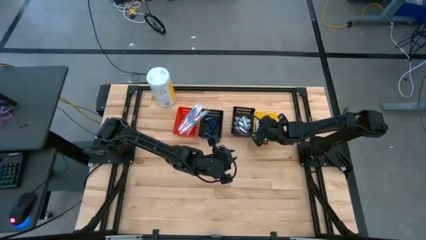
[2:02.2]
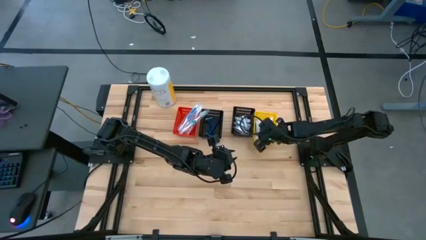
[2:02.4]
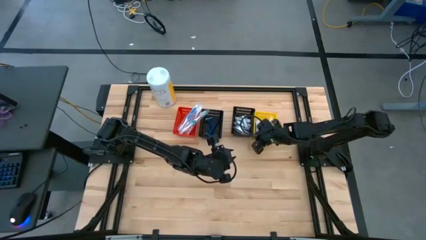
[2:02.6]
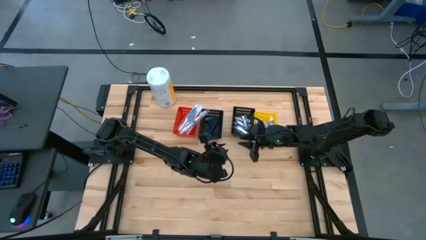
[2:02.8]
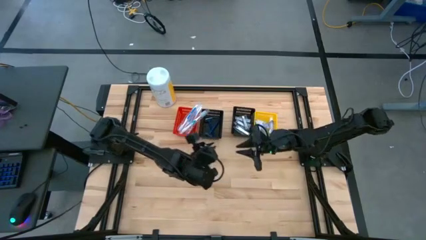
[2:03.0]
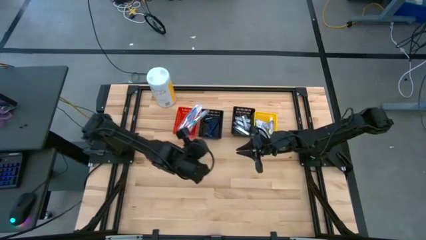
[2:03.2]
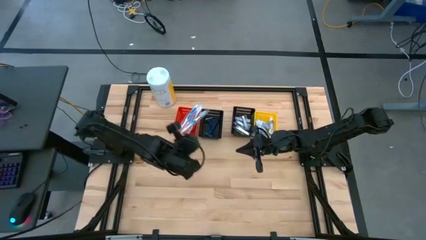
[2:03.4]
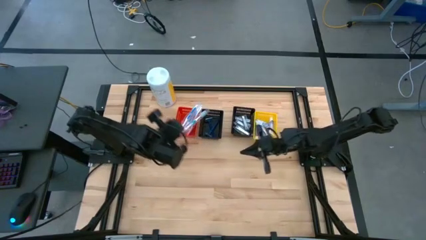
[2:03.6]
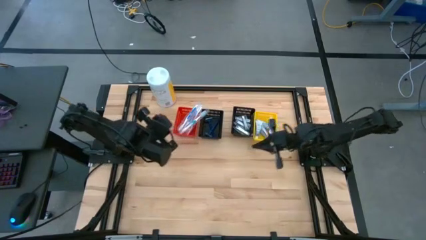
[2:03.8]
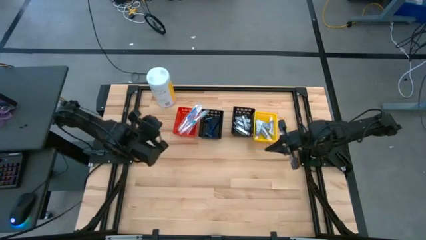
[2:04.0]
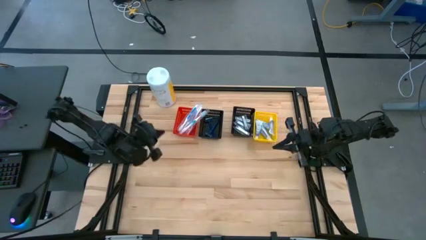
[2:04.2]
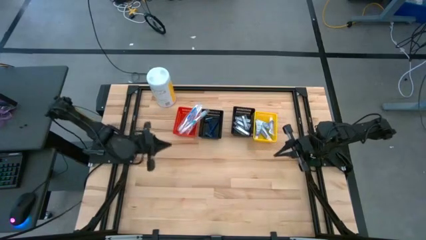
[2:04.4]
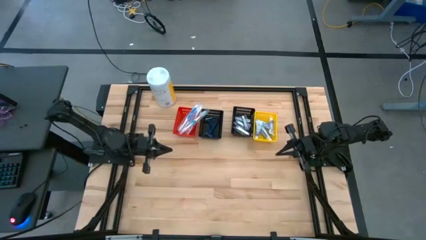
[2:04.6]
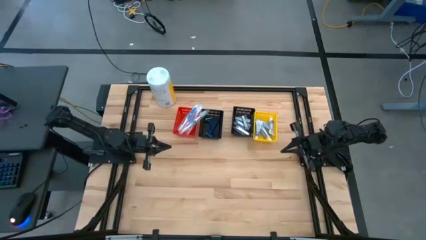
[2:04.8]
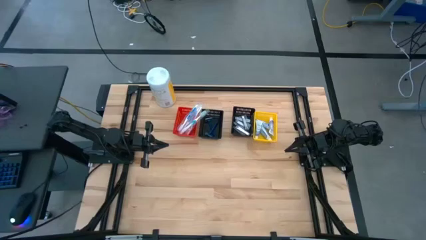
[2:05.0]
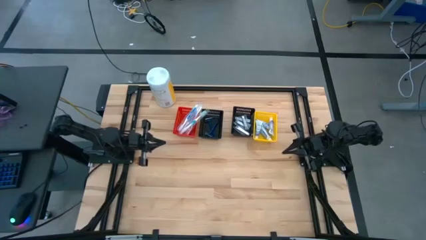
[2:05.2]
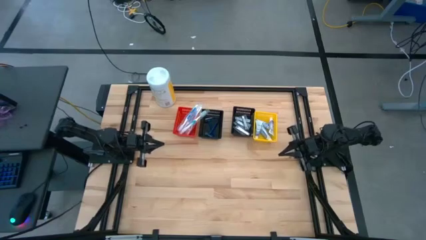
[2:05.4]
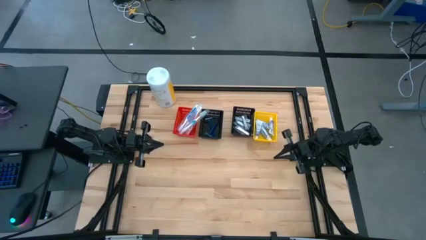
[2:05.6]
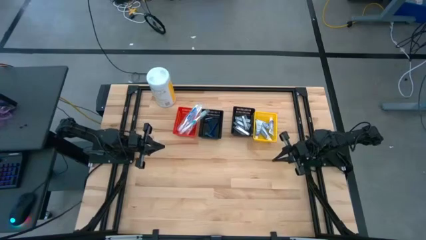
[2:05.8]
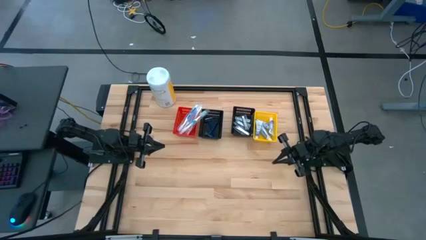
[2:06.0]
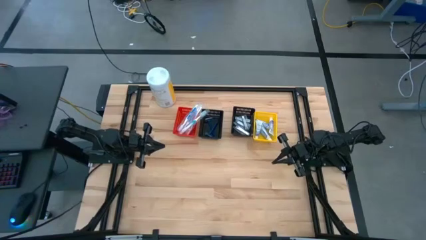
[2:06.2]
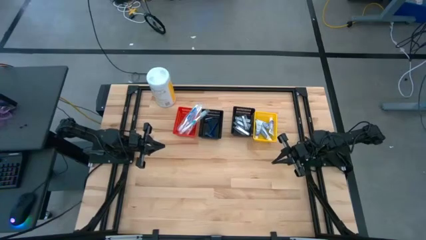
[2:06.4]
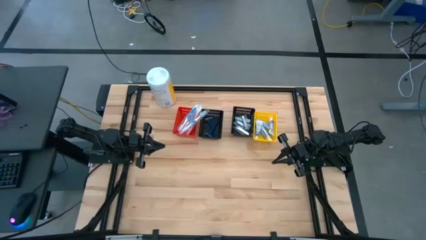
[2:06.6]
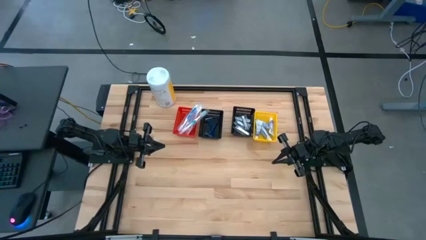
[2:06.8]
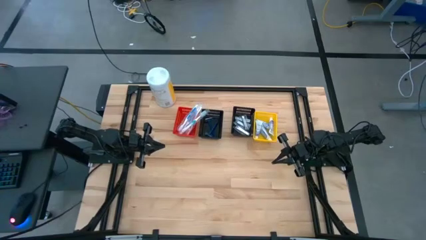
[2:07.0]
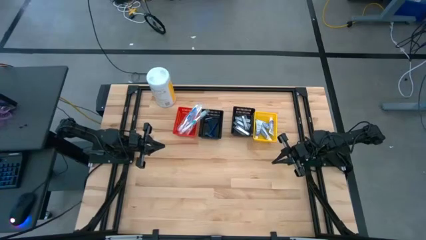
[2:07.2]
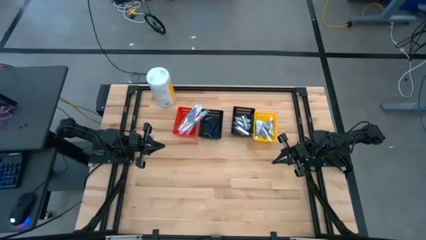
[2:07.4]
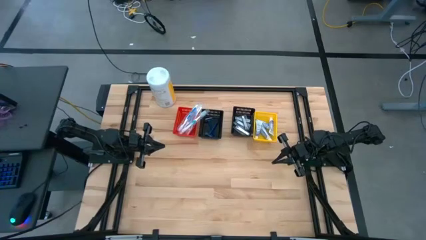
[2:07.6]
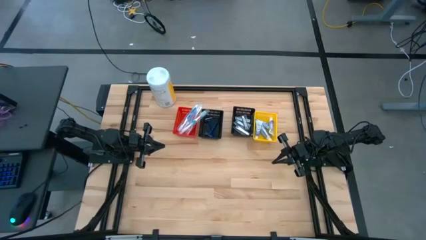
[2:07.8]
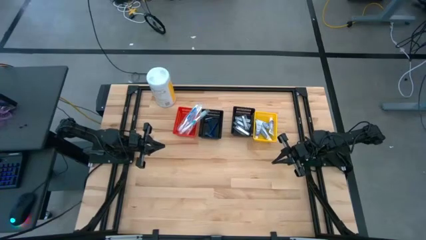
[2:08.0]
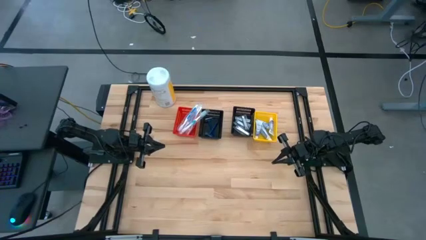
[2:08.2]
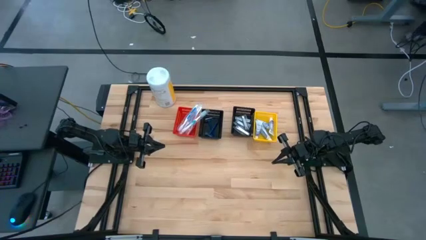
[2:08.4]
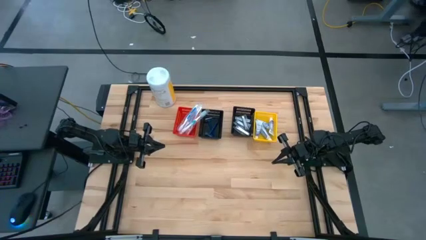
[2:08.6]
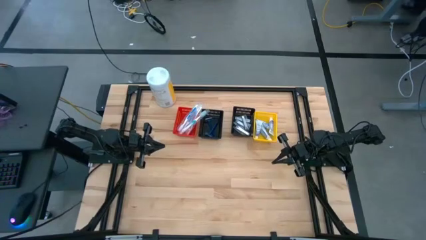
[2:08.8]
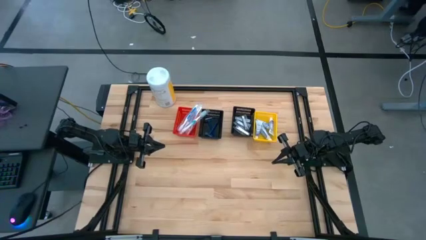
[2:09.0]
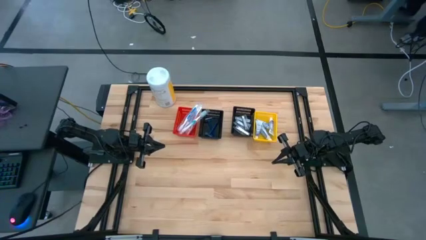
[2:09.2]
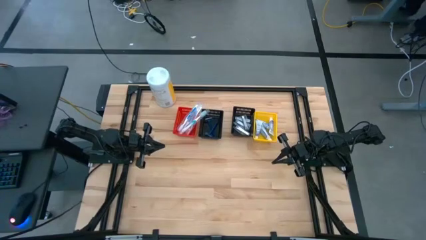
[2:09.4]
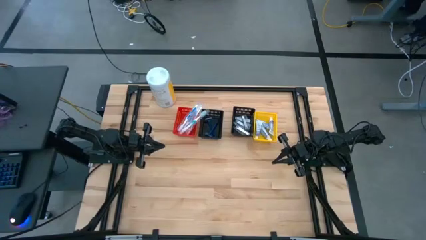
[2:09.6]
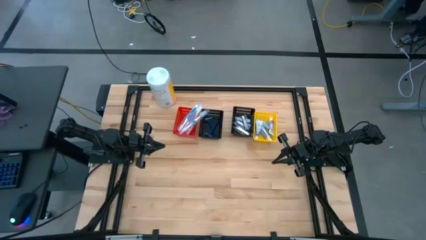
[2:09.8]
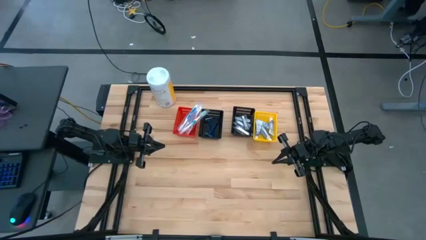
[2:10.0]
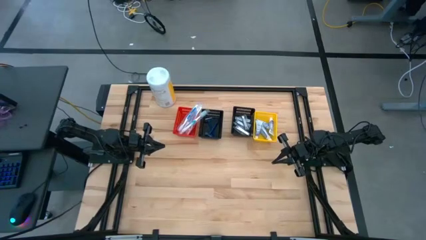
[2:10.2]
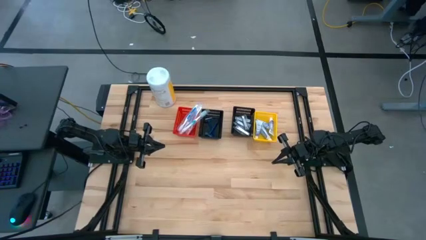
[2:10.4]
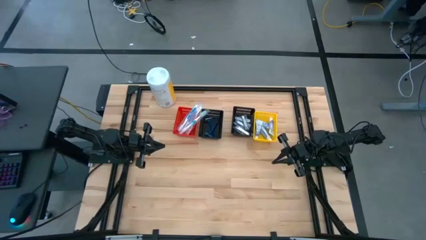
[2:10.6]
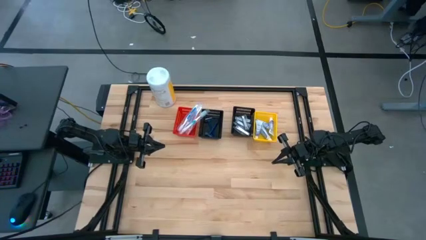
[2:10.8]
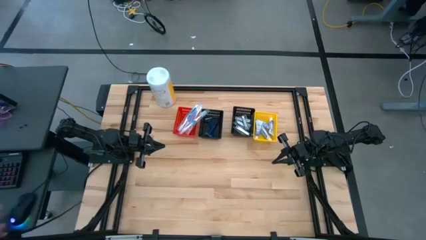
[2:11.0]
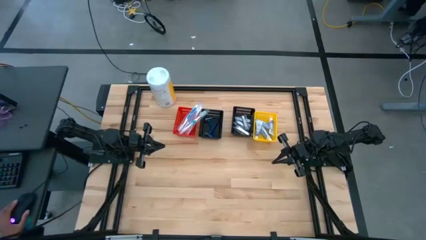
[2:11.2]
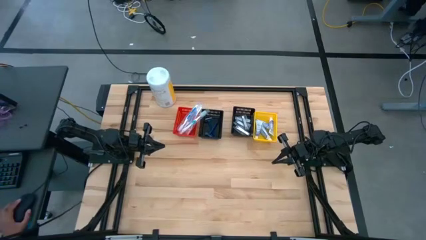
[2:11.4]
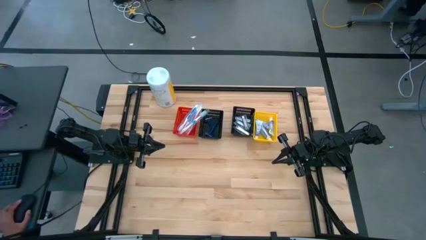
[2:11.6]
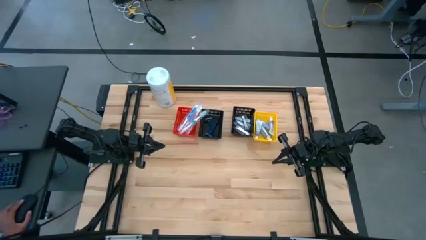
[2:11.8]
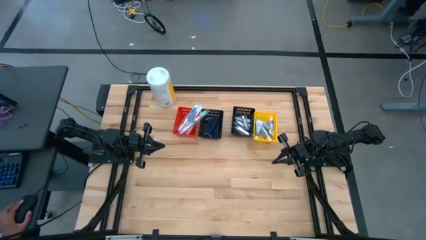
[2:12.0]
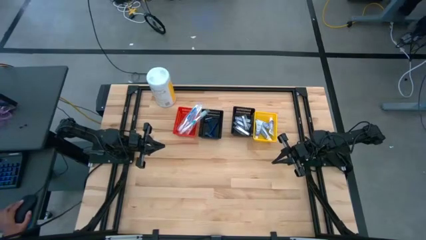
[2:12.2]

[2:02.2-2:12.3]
Task: Pick & Place Travel size toiletries
Return to Home Position

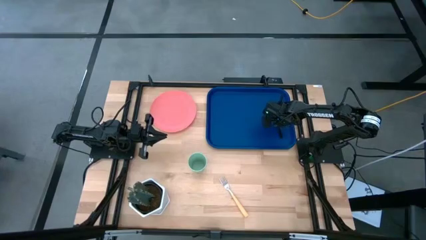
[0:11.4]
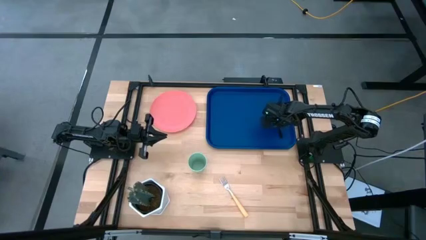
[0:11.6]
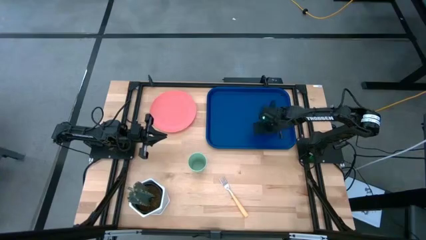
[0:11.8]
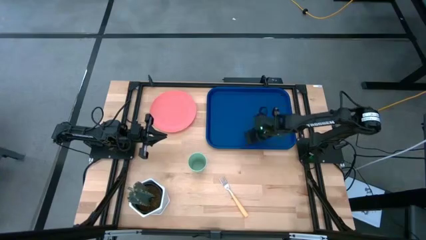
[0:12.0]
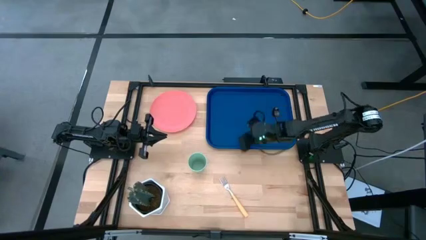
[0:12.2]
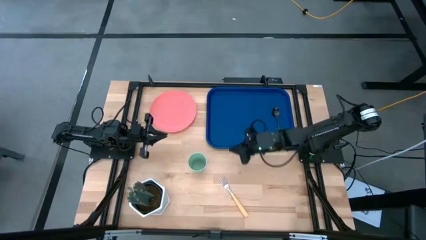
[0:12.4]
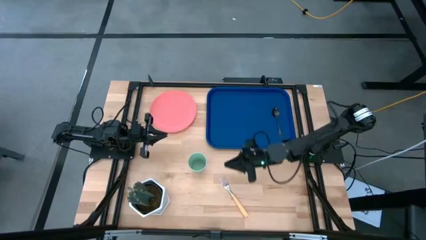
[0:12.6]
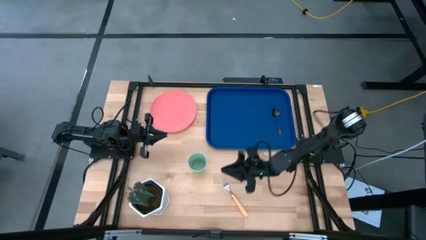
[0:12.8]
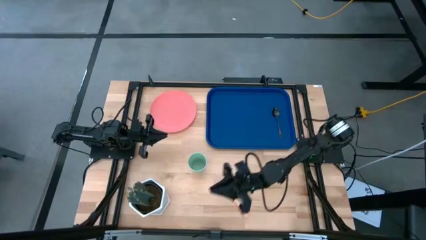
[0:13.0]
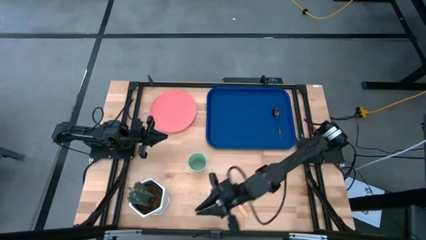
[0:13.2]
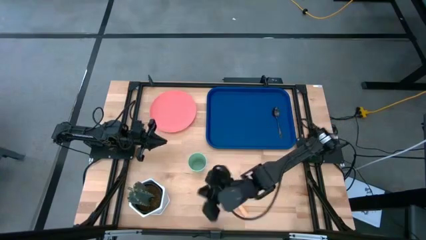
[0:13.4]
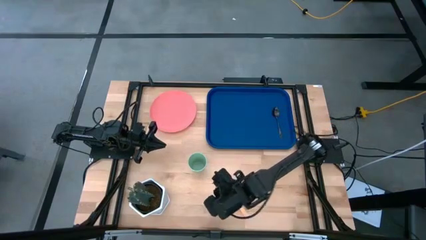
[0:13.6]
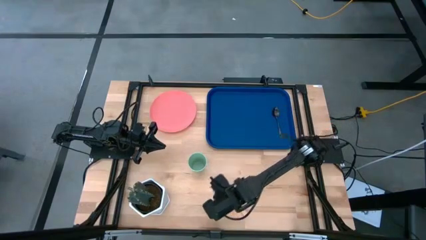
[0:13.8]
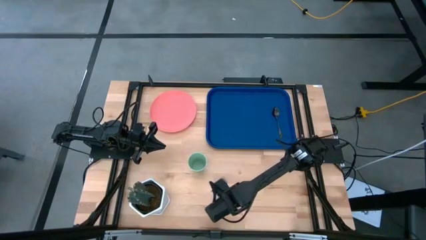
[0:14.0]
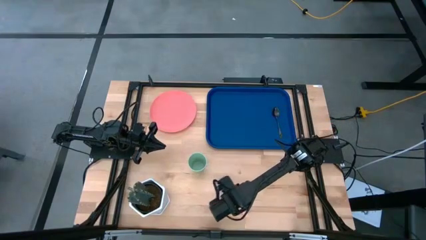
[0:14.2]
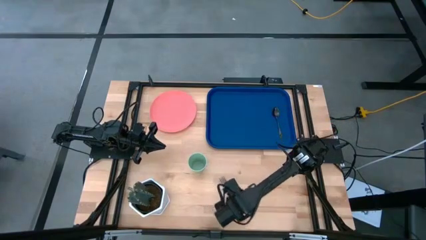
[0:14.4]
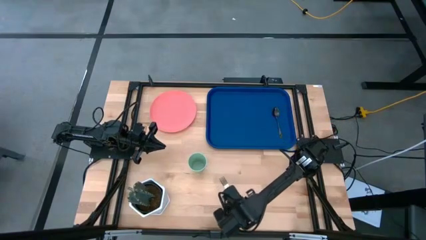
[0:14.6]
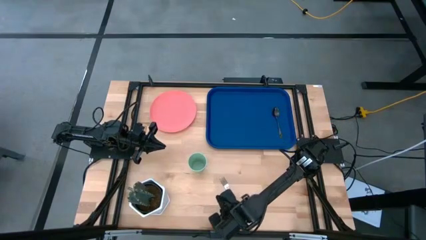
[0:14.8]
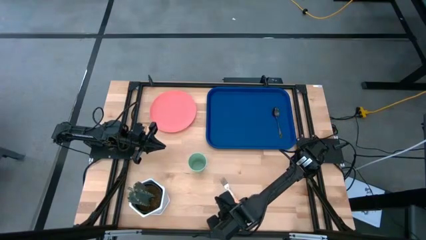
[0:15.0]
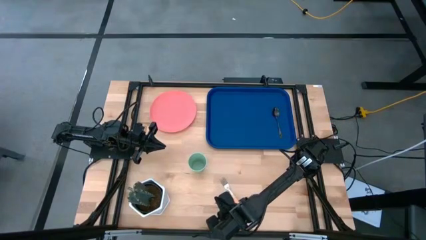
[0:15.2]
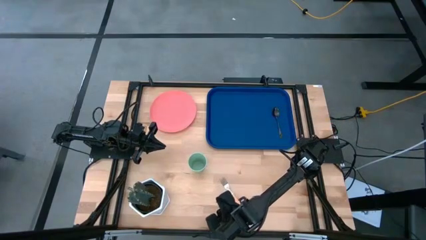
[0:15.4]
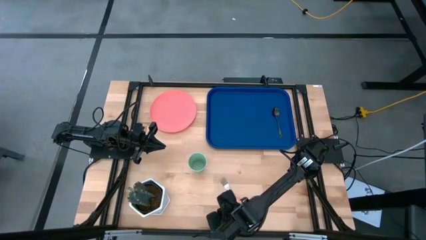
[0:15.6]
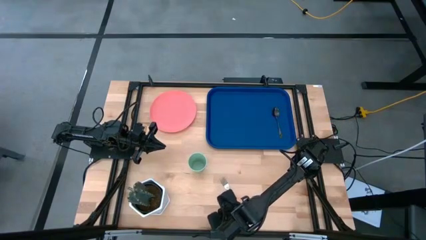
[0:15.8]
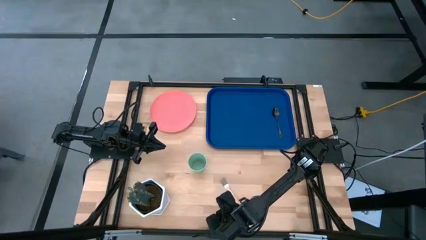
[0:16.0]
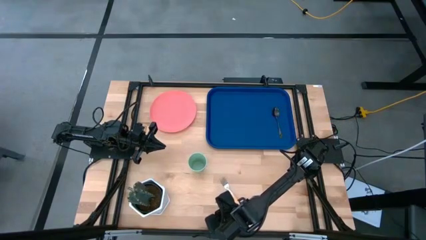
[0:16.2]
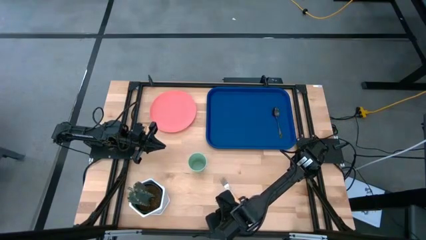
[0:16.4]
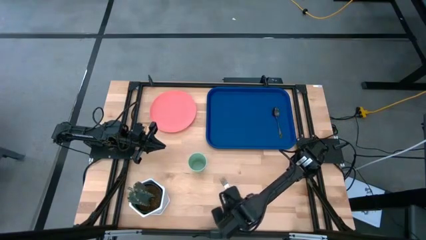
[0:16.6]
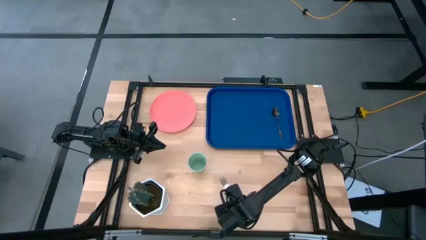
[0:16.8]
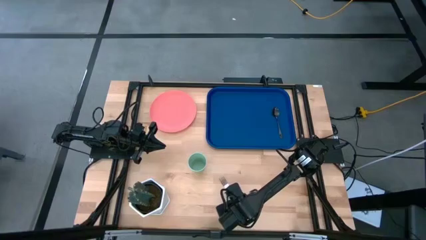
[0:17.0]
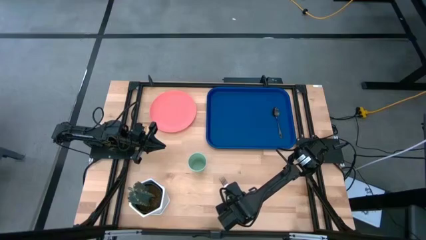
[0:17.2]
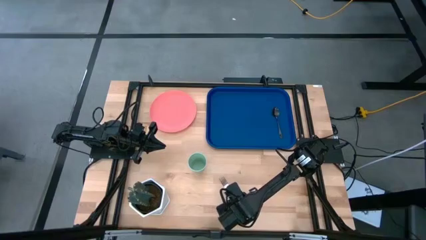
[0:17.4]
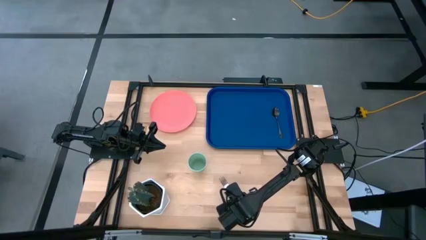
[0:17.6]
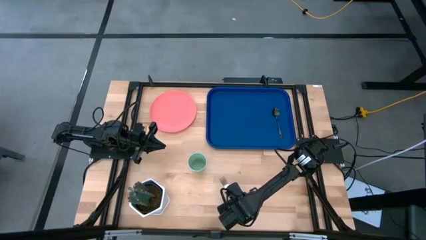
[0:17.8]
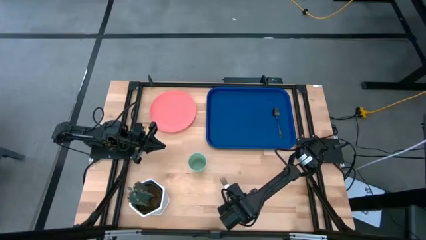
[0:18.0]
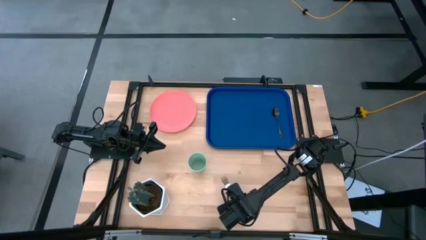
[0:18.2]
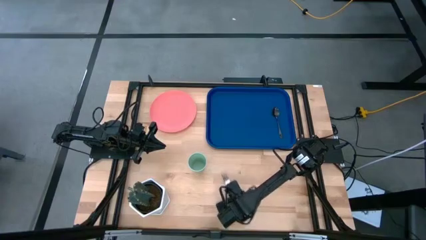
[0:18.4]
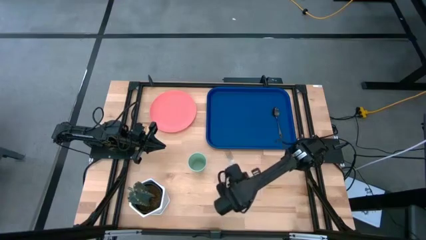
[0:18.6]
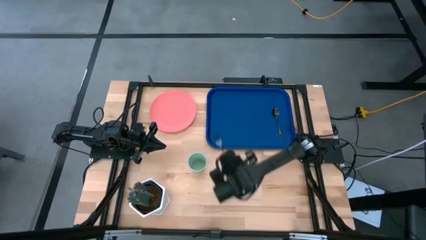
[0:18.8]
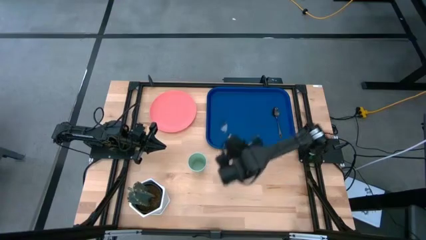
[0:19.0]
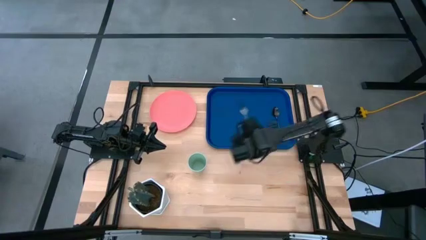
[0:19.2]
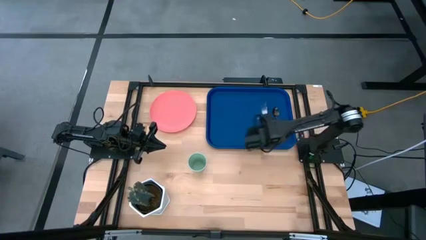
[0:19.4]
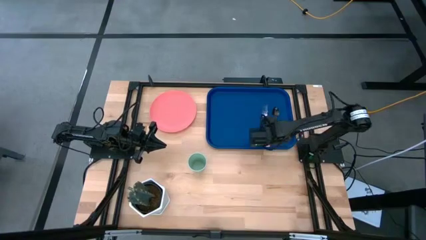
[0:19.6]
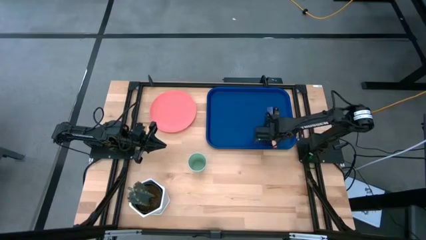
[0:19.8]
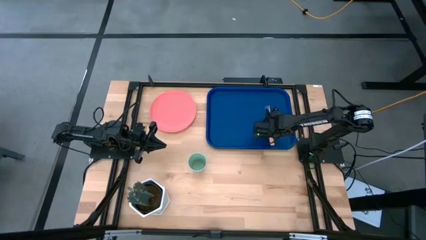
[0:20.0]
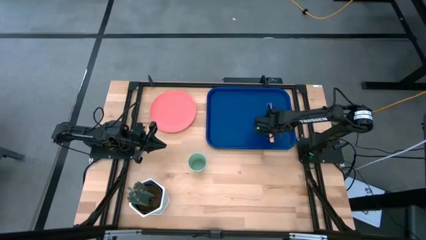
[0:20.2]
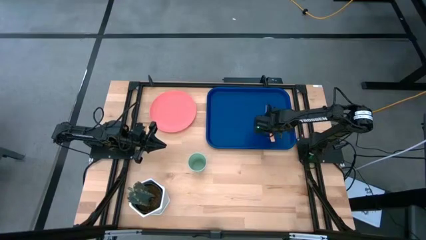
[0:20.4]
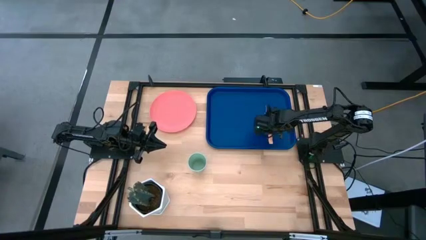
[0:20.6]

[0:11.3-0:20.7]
Task: Pick and place plate/cup/fork/spoon on tray
Put the light orange fork on the dark blue tray to the left side of the black spoon
